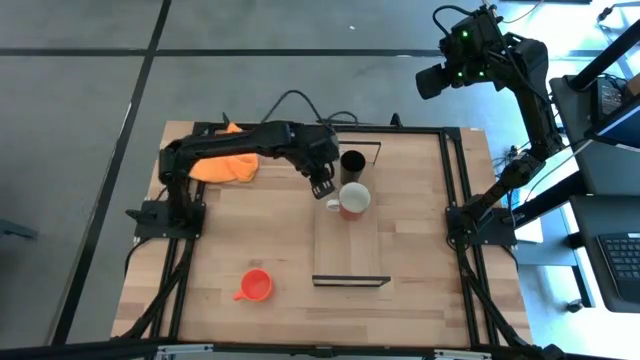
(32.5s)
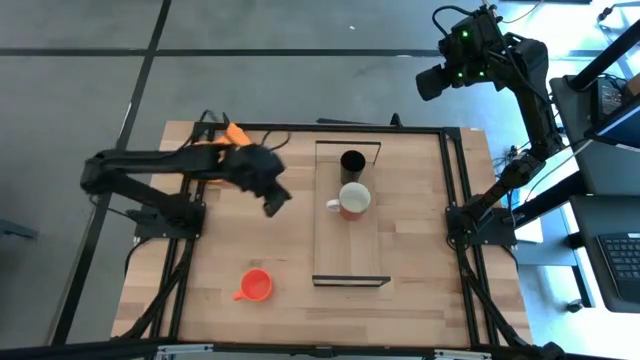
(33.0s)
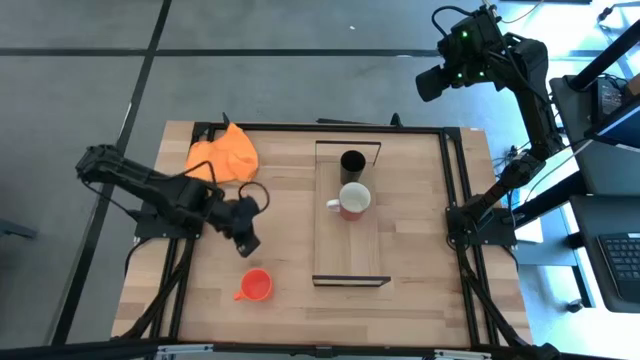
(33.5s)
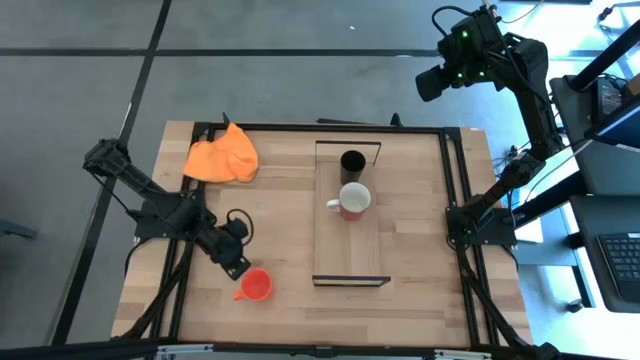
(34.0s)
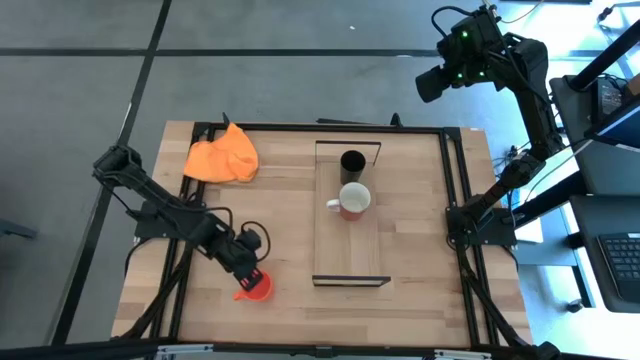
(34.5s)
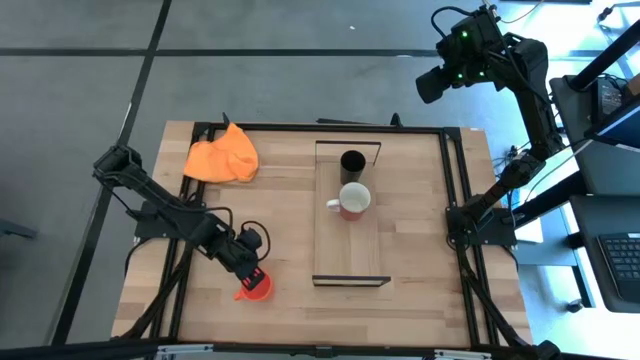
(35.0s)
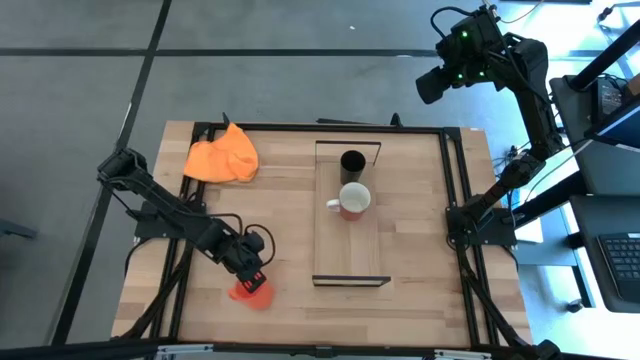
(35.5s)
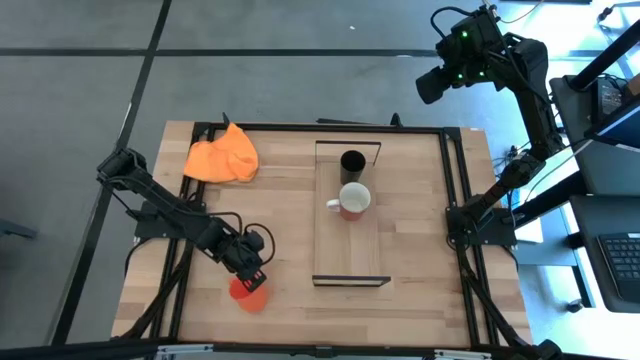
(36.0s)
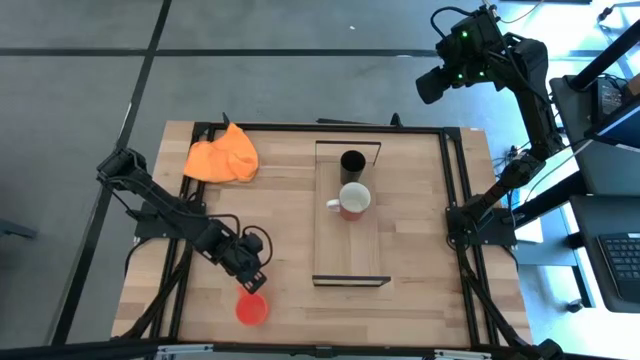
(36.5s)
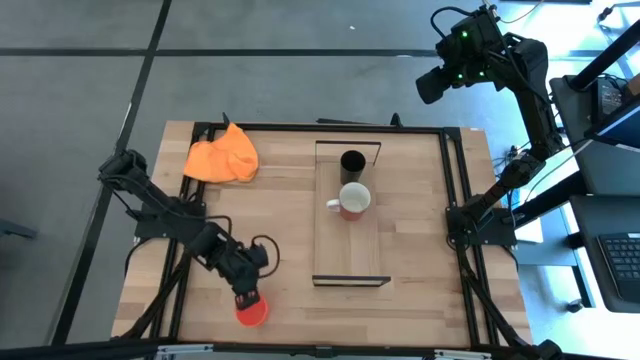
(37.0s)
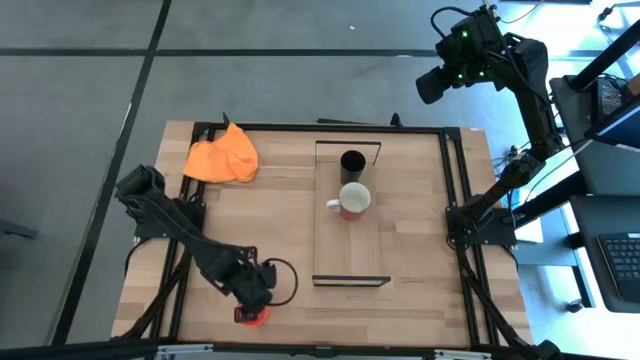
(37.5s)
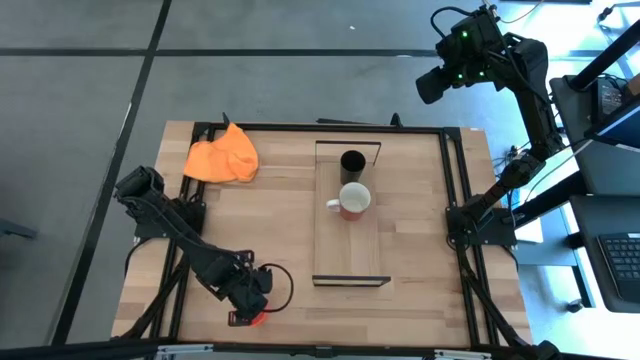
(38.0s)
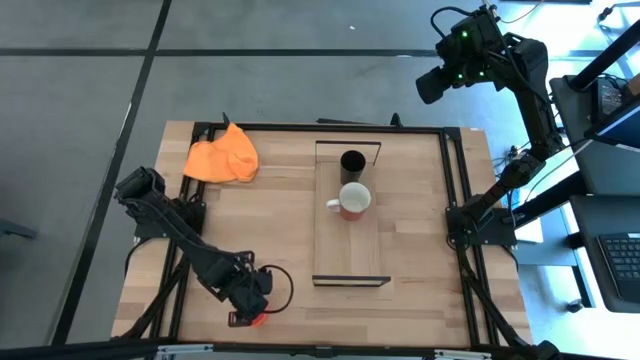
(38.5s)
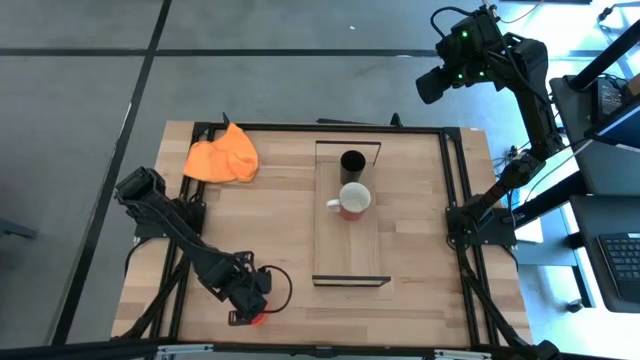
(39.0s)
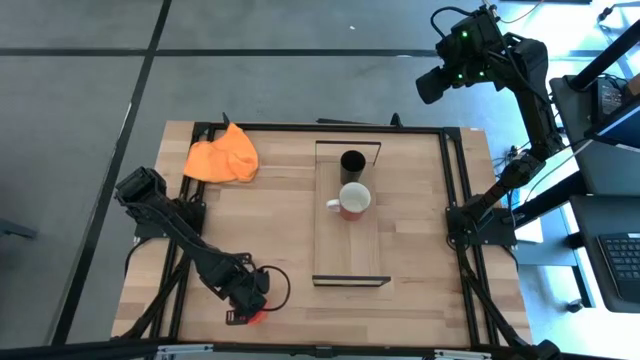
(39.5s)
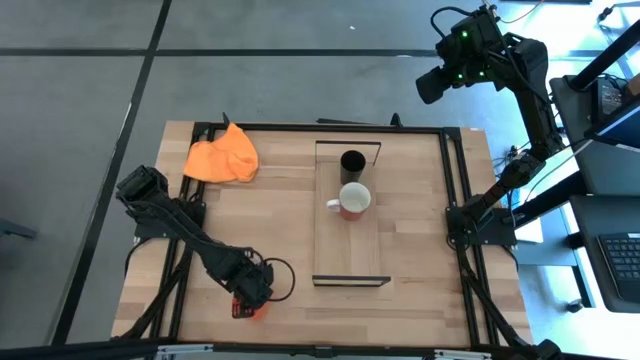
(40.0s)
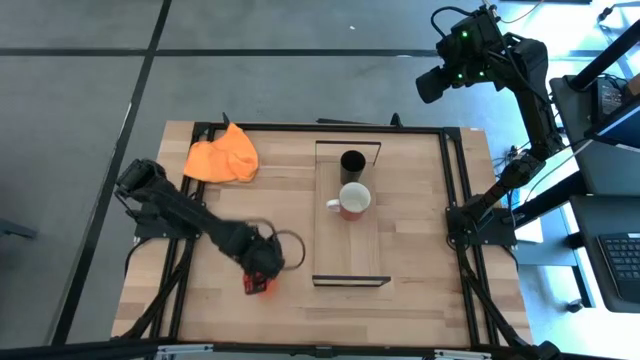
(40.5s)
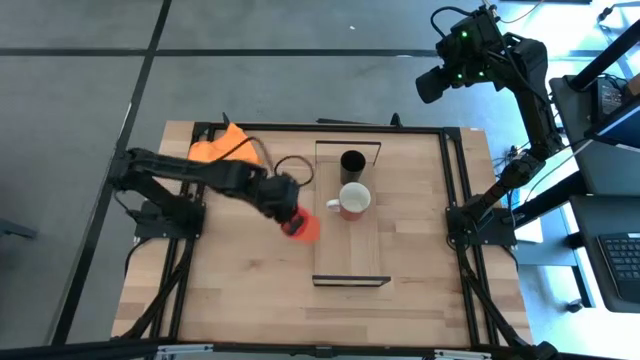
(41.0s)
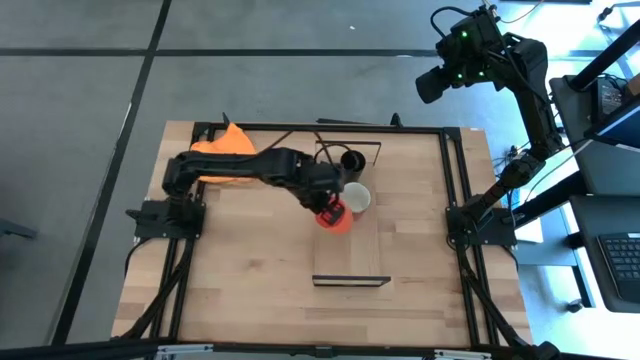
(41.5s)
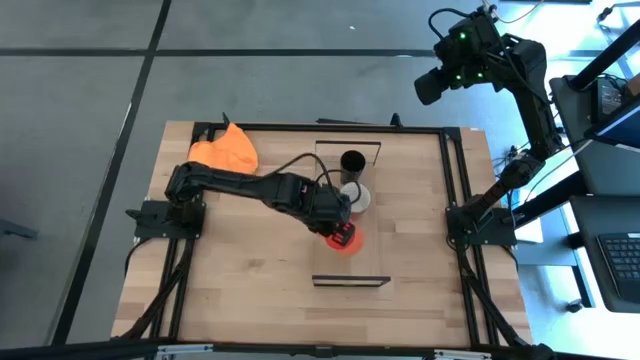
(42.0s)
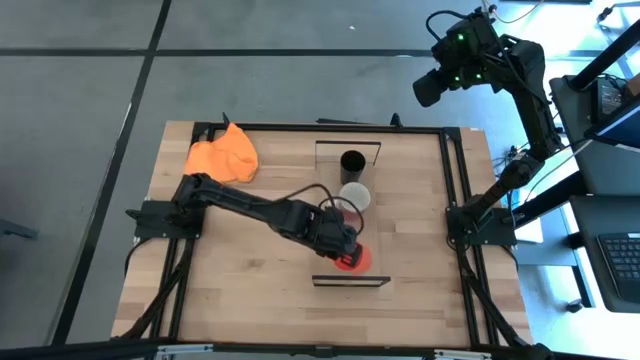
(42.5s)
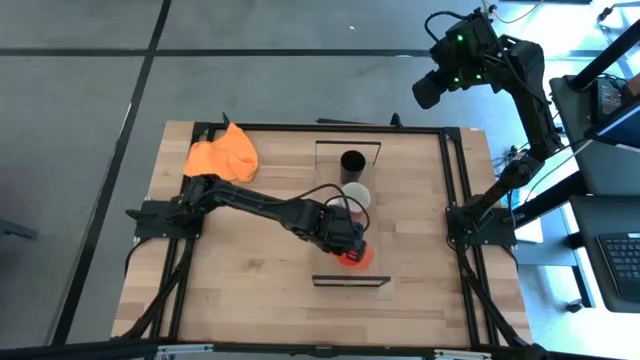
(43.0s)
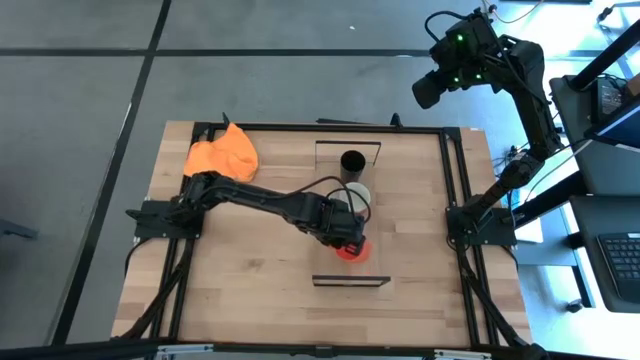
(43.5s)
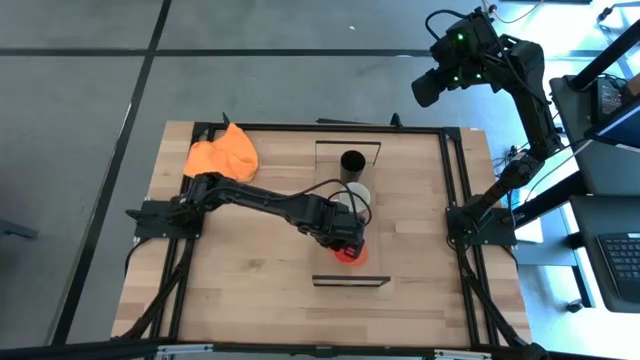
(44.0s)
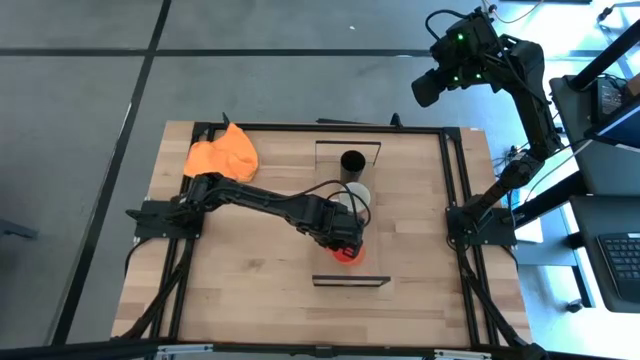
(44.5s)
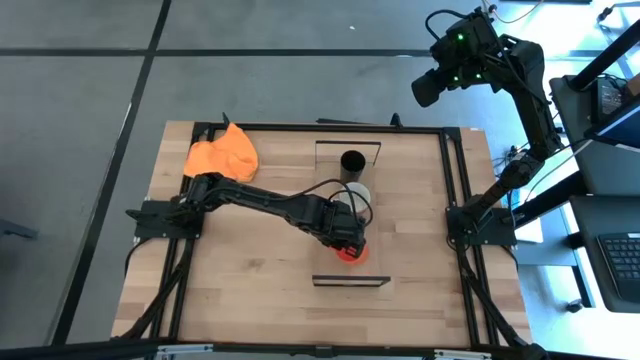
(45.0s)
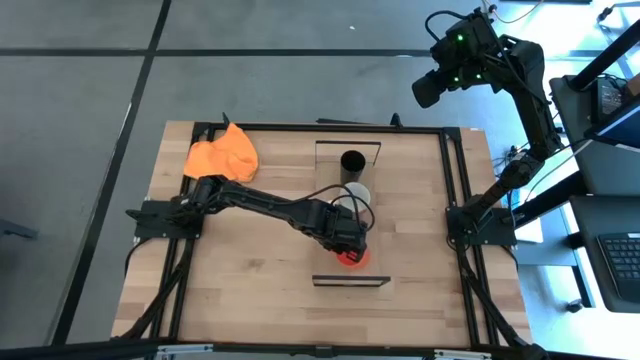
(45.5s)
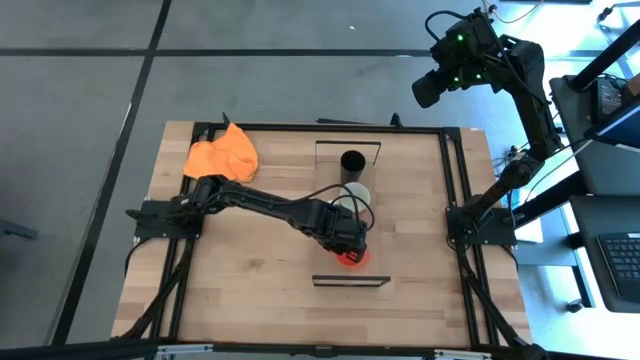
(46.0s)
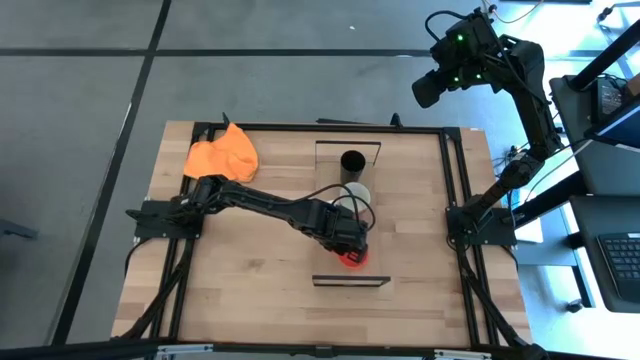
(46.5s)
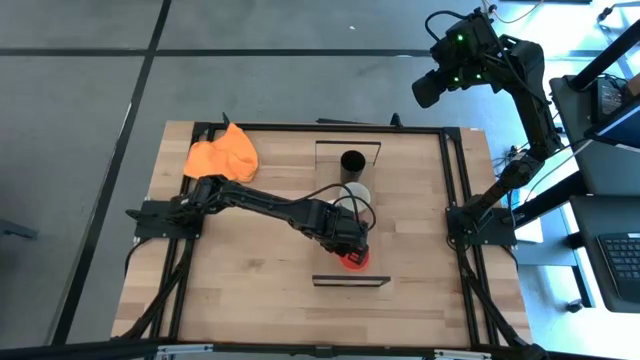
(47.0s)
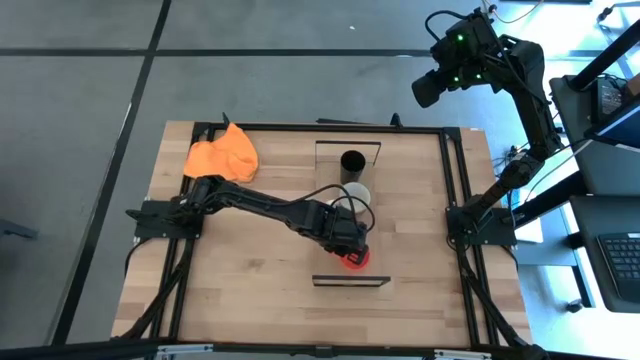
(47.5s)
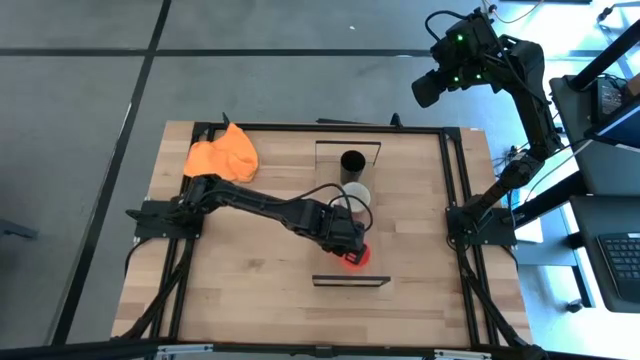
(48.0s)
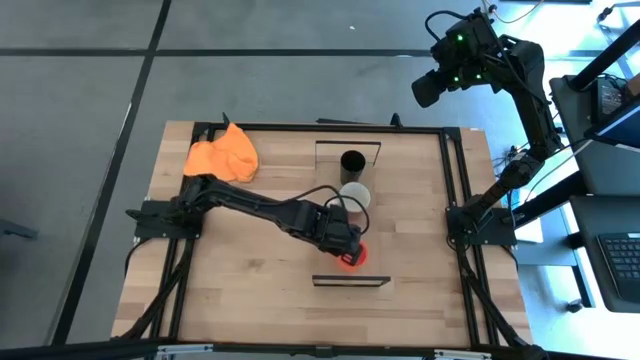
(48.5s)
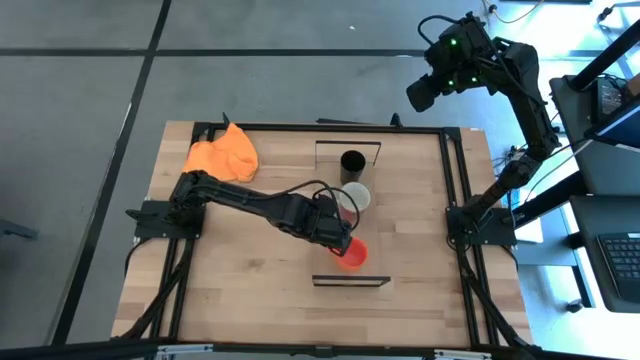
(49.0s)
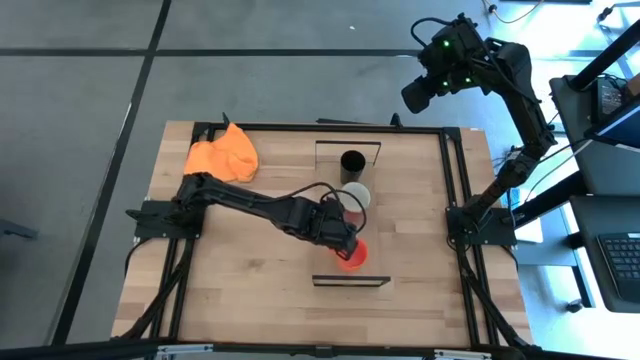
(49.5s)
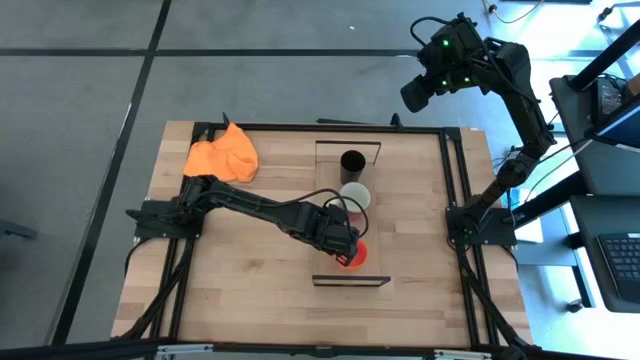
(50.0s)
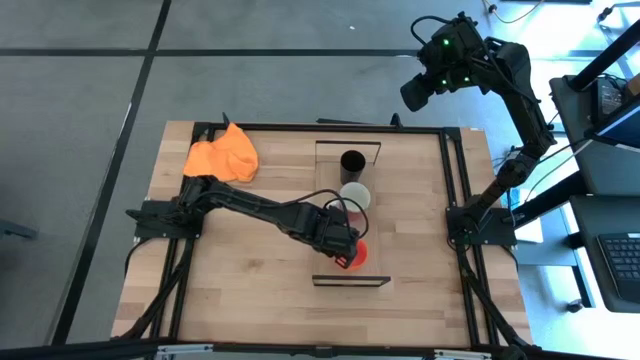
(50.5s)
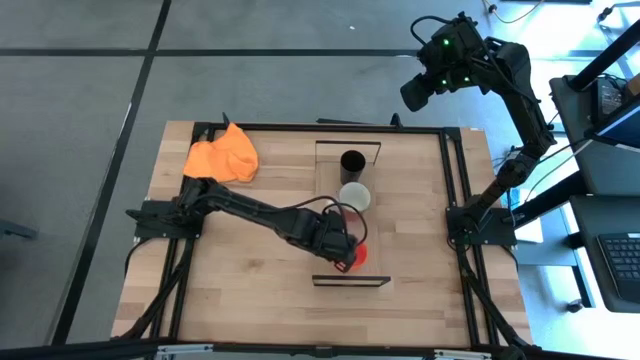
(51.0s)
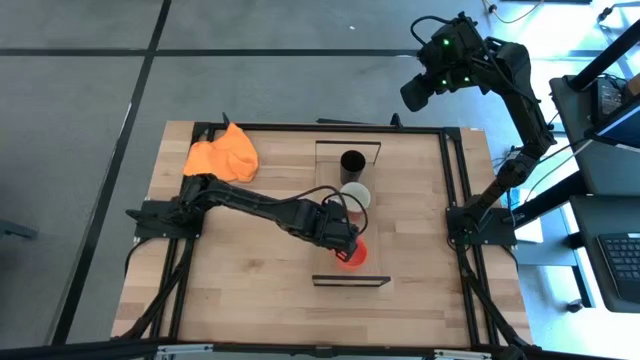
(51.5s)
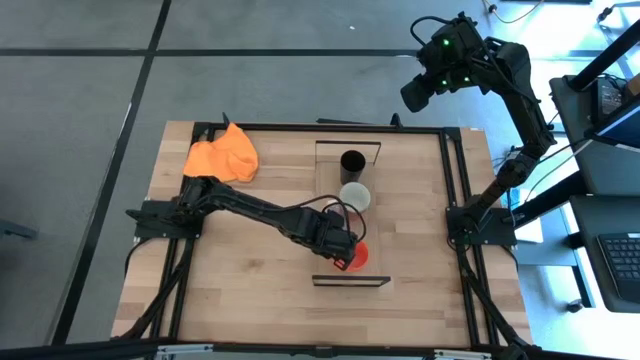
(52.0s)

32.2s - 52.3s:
Task: Stack small to large cups/mugs on shelf
Put the orange mug on the shelf

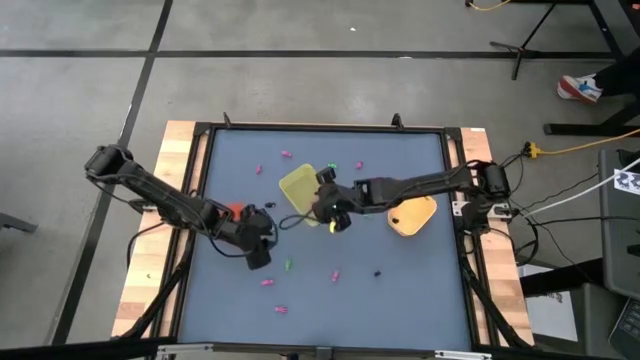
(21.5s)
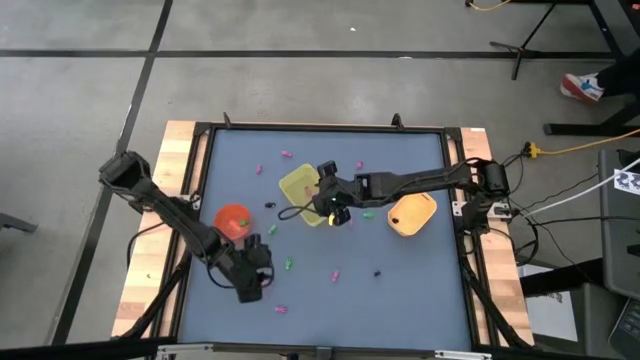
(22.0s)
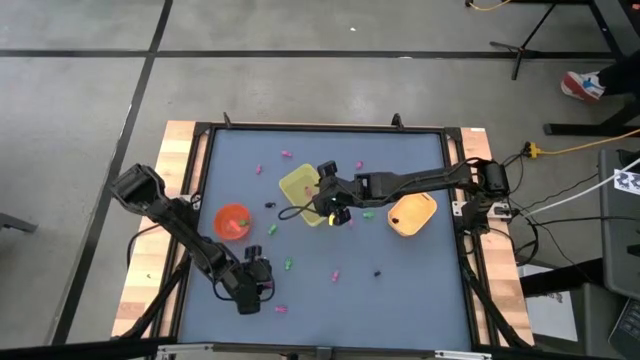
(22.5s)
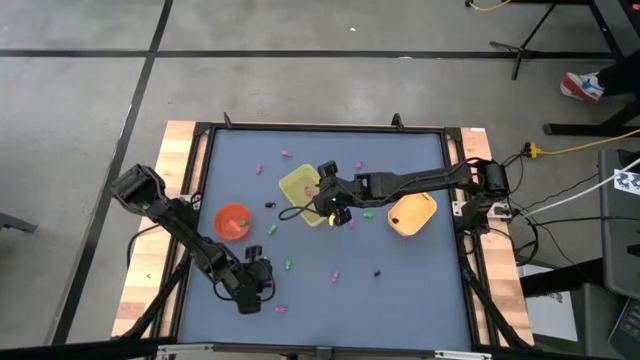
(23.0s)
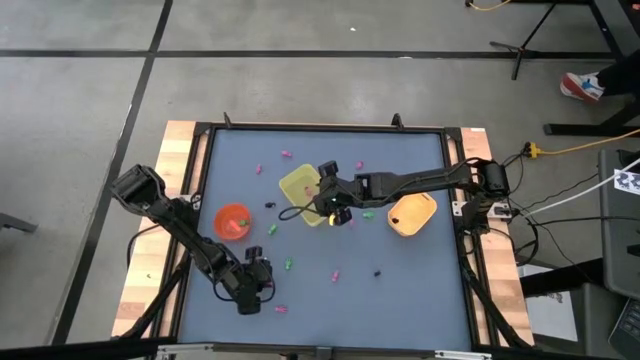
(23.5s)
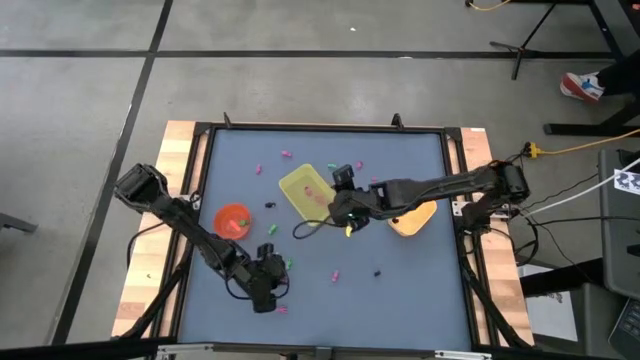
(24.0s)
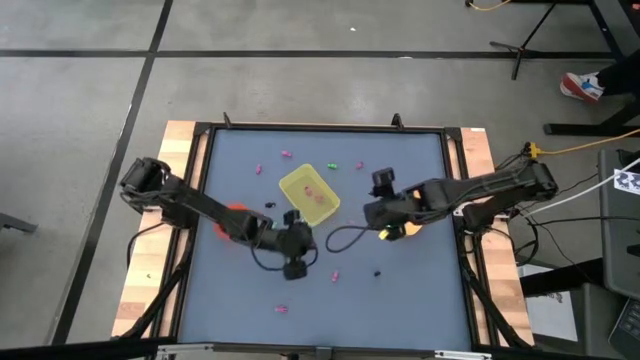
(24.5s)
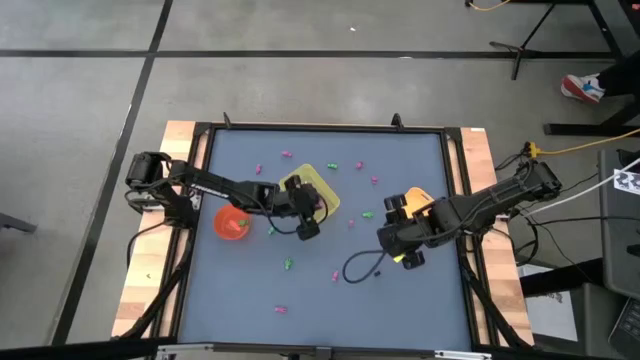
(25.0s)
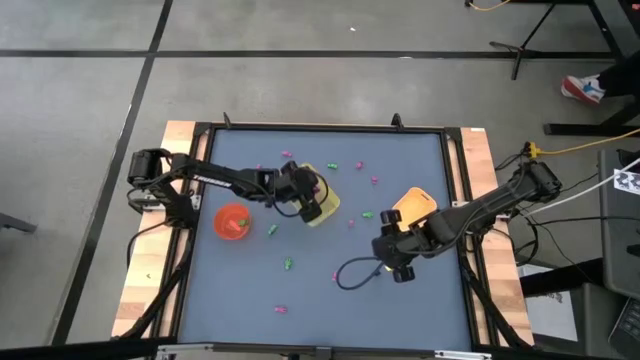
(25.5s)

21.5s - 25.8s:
Task: Sort Halloween decoration
Put the pink skeleton toy into the yellow bin
